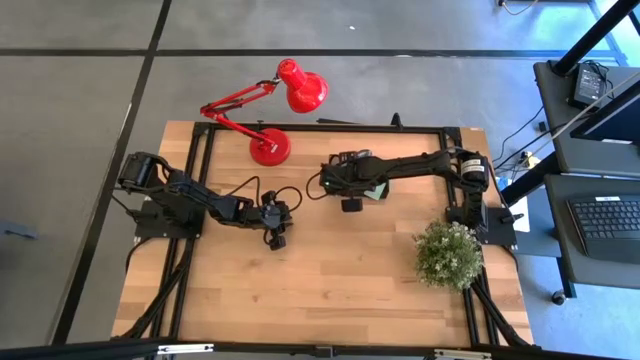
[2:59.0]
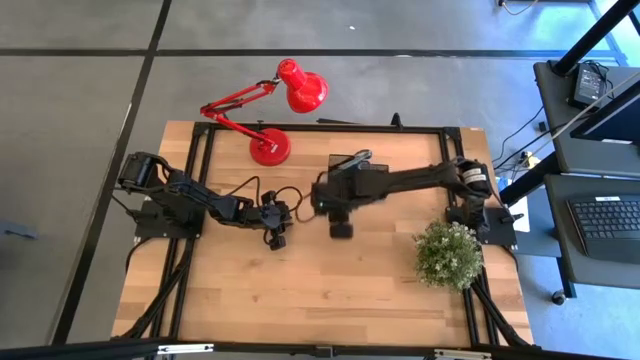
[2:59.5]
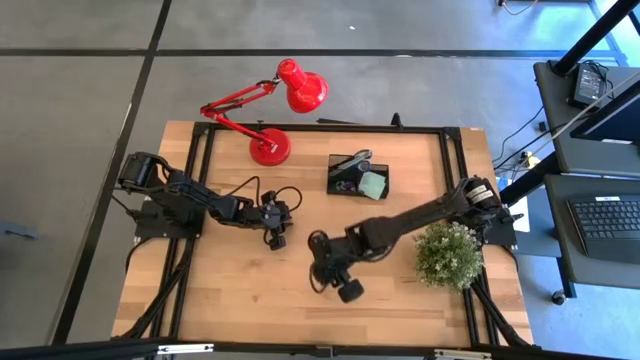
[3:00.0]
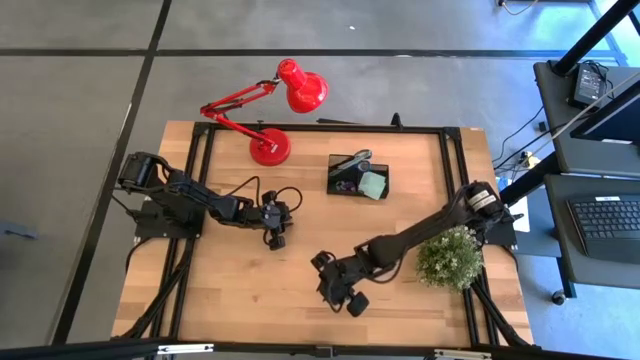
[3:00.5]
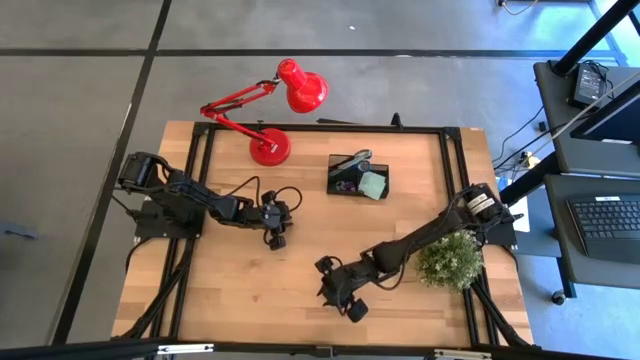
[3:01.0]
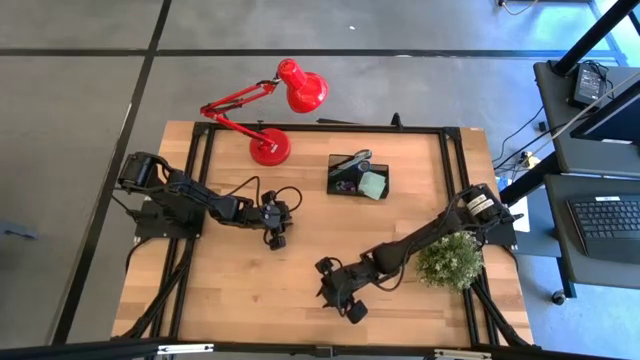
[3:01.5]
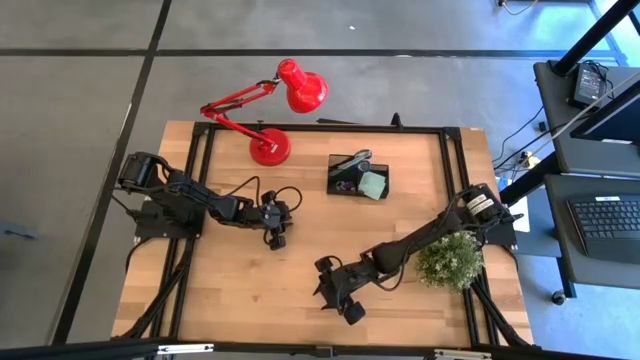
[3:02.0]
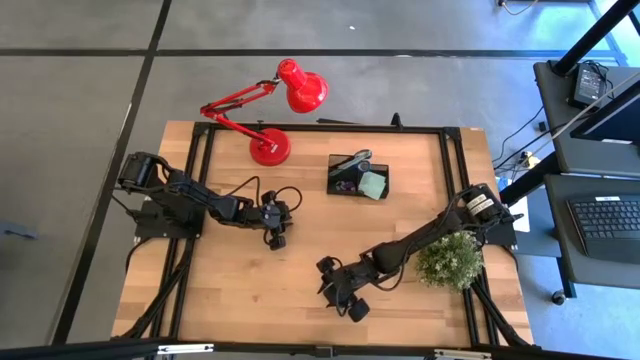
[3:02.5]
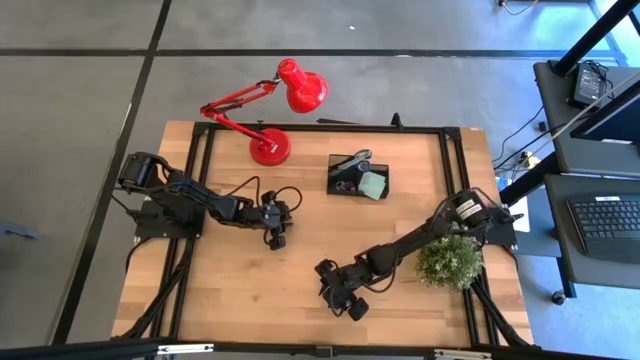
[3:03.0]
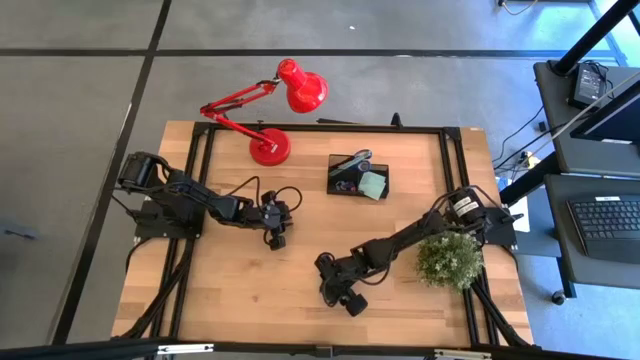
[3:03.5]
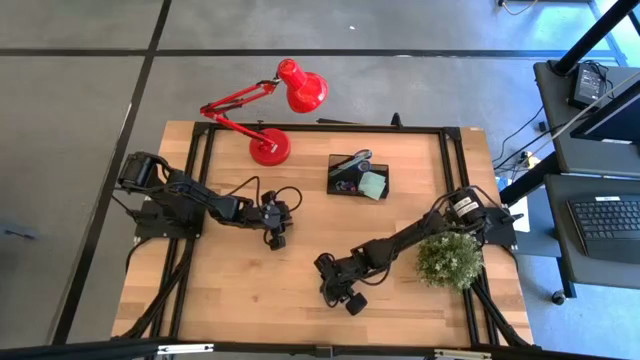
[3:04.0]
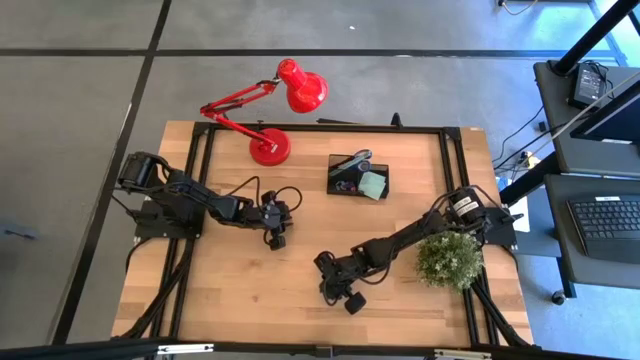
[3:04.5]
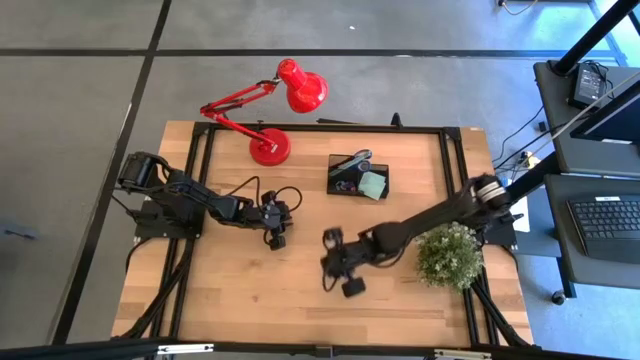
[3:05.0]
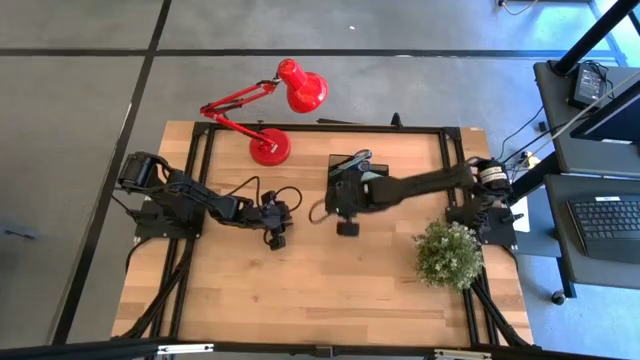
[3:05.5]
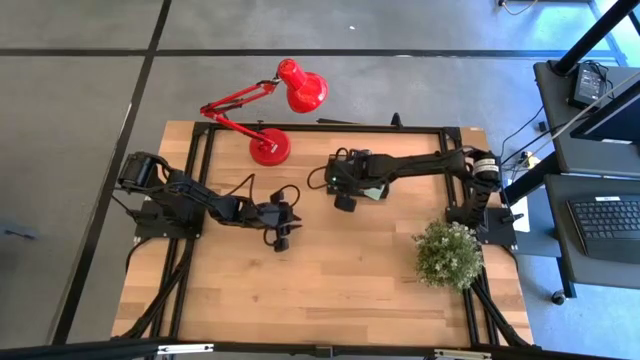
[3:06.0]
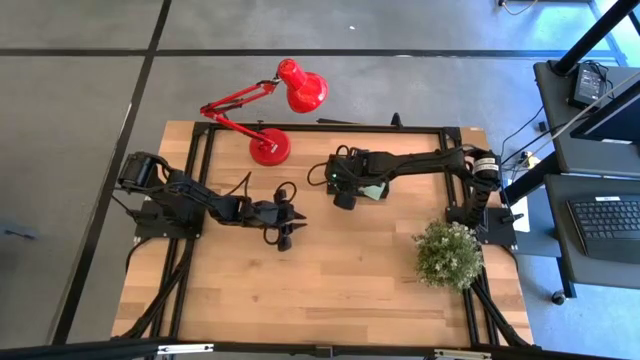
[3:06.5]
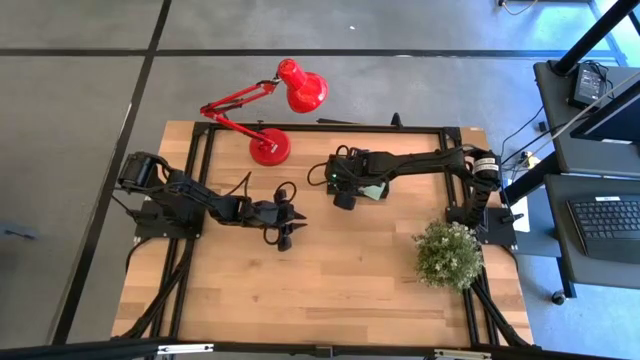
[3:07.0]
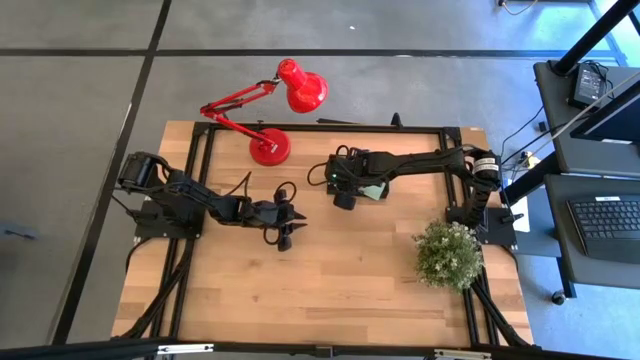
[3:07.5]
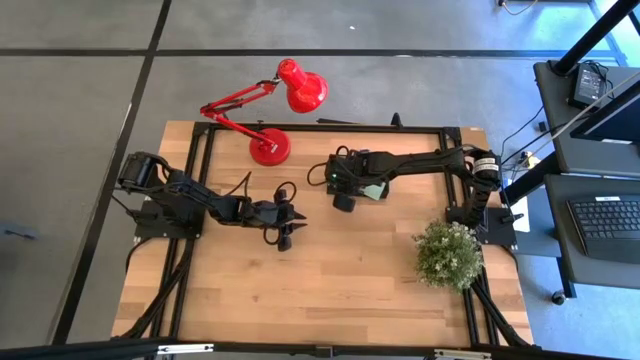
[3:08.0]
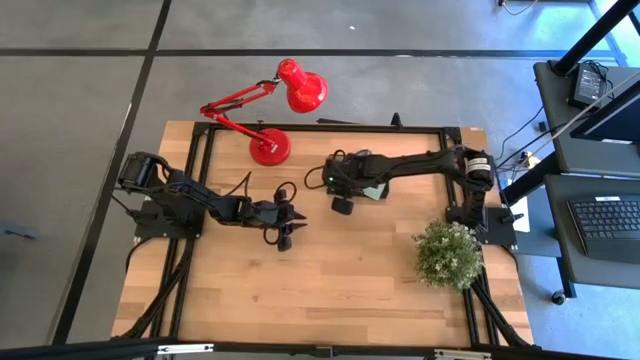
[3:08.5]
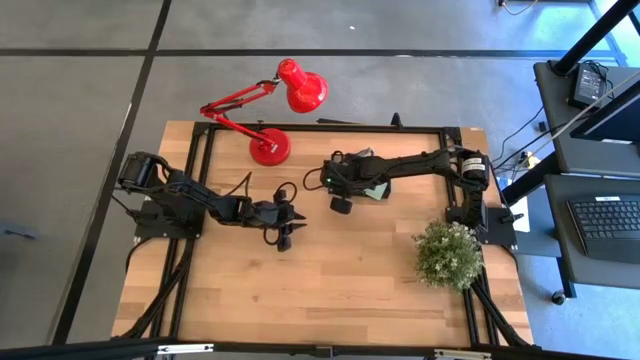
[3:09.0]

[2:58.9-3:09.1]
Task: Pick and place office supplies into organizer
Put the right pink binder clip into the black desk organizer

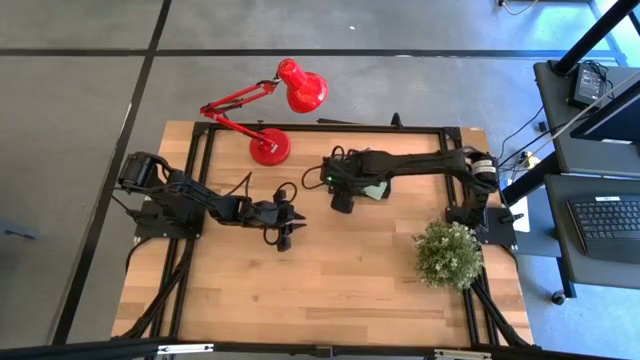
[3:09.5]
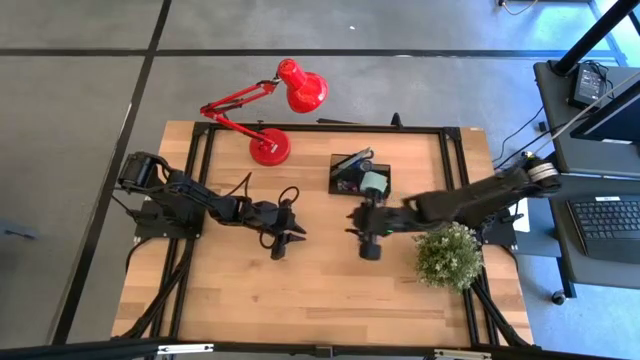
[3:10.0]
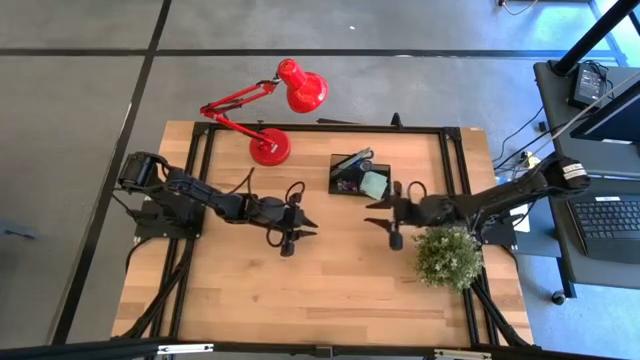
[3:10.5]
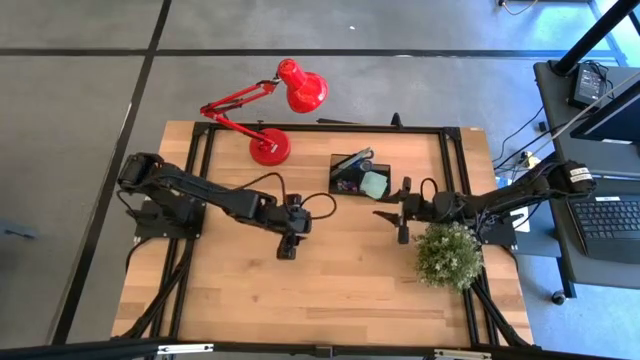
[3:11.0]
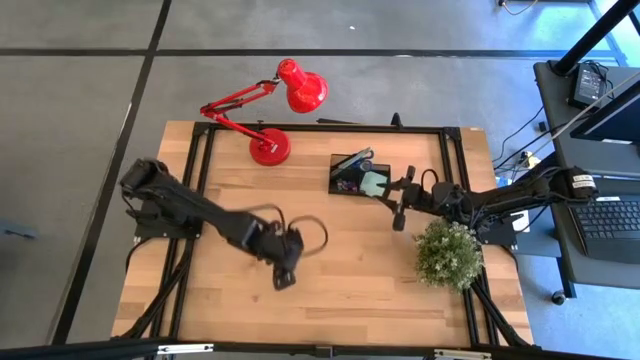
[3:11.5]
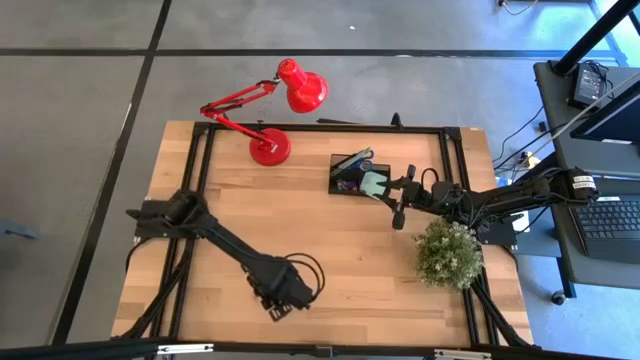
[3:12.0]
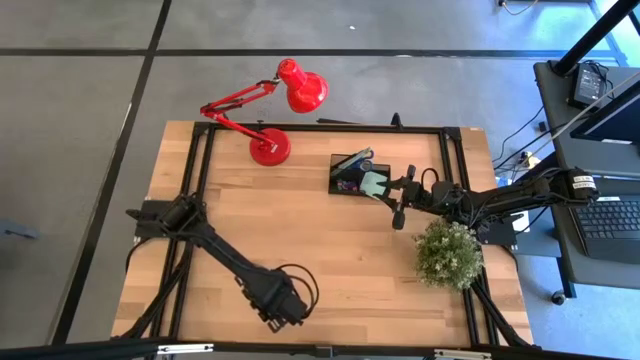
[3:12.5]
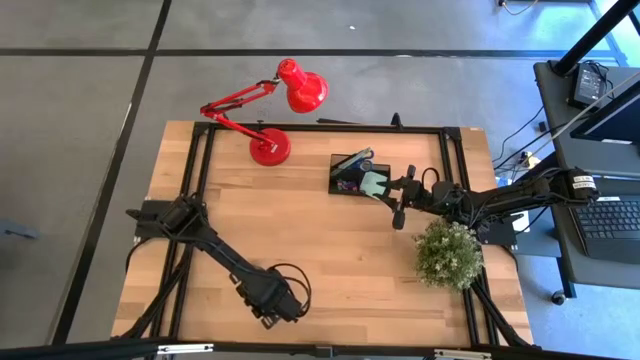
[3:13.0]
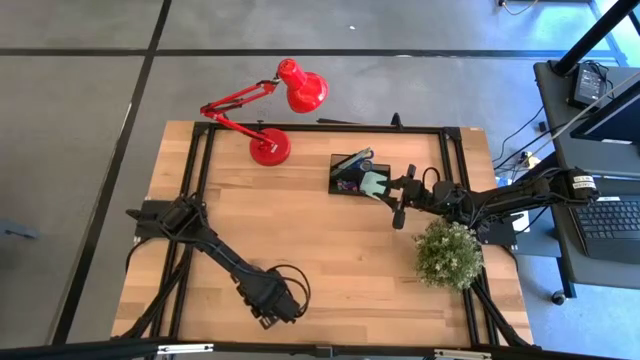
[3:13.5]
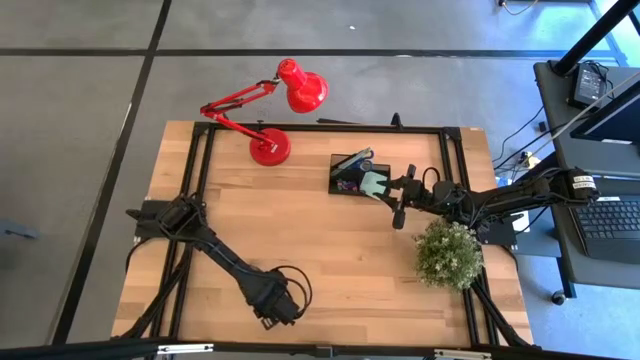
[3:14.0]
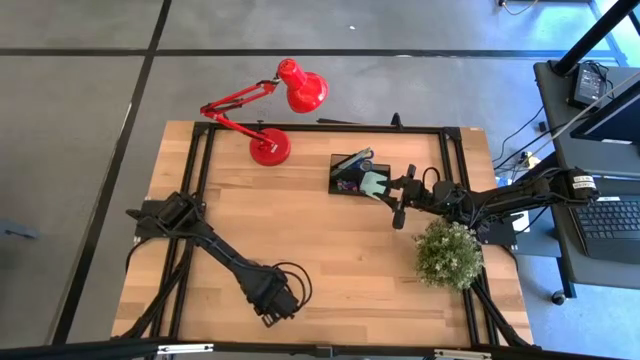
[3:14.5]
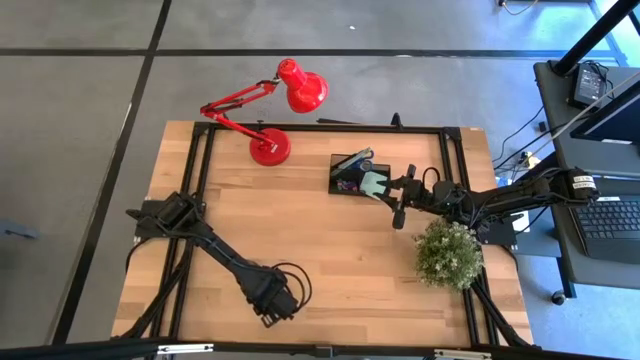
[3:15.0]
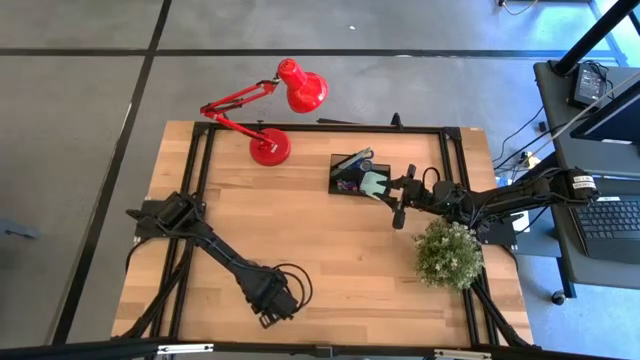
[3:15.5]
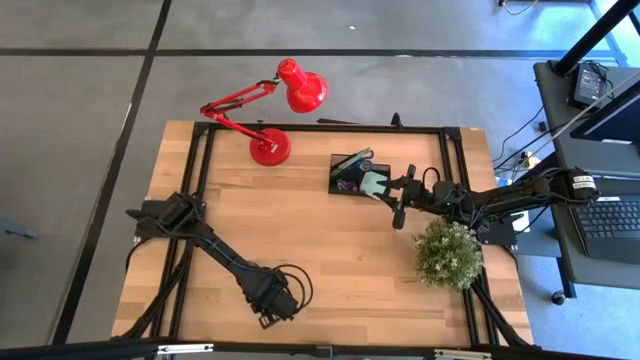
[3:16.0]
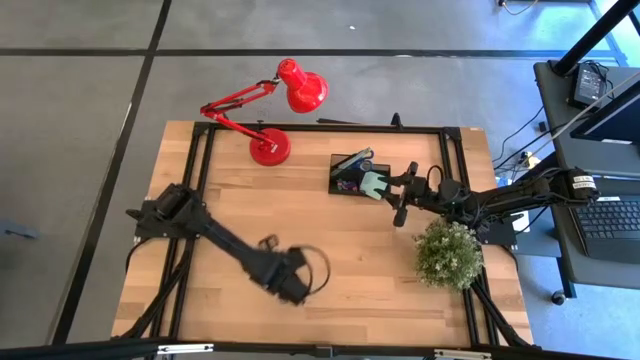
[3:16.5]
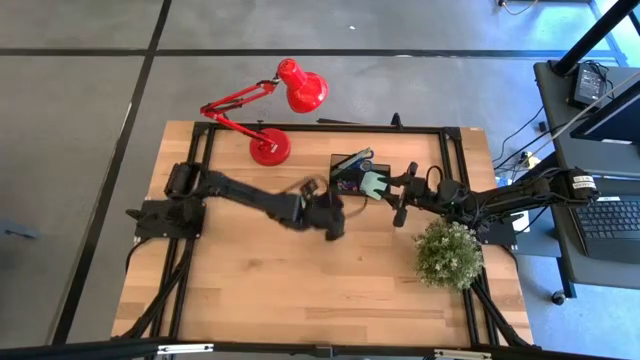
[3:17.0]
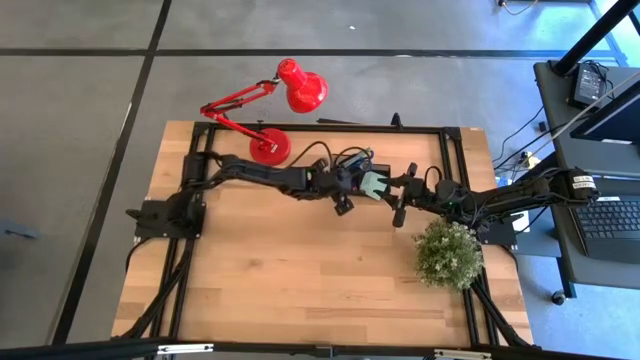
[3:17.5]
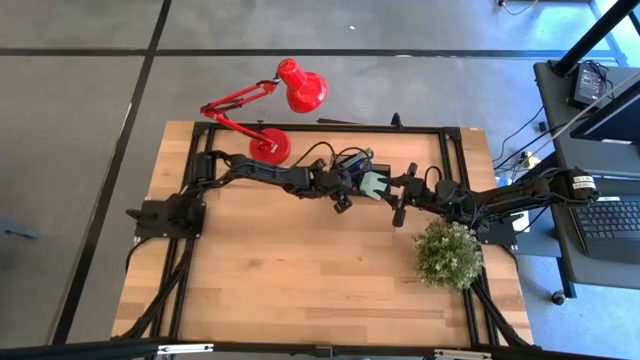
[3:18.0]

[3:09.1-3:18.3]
Put the pink binder clip into the black desk organizer

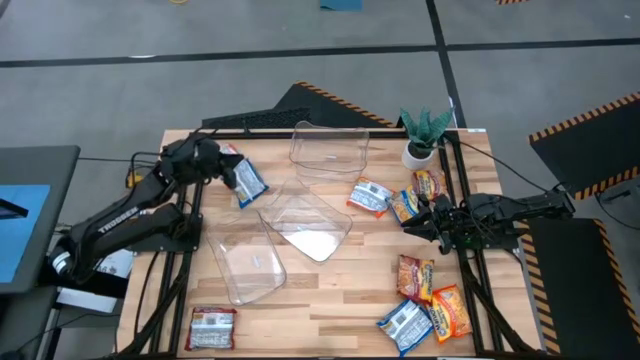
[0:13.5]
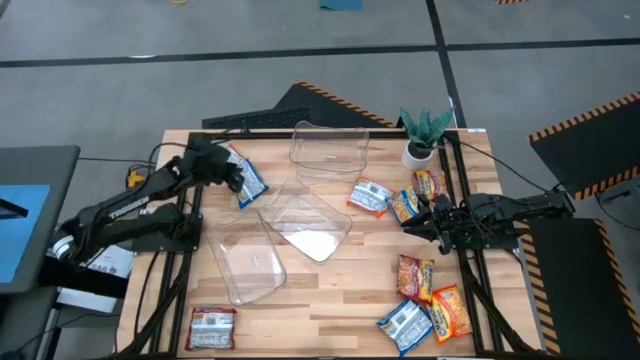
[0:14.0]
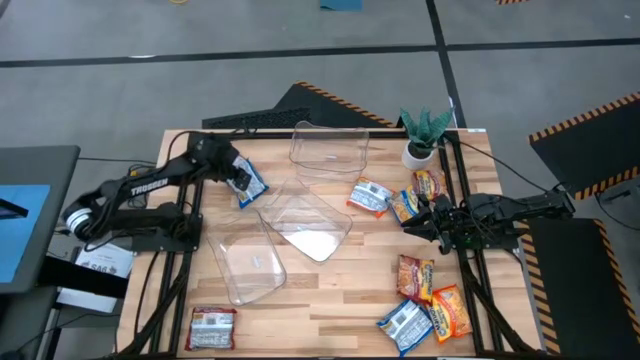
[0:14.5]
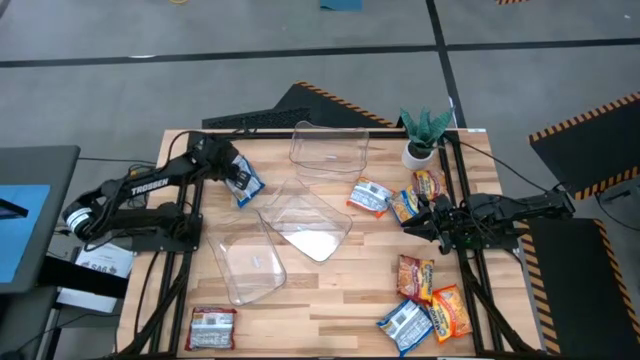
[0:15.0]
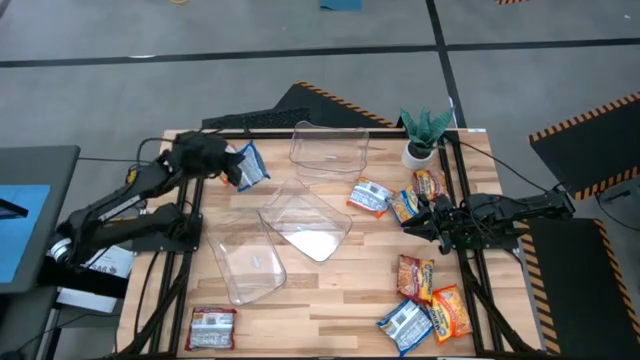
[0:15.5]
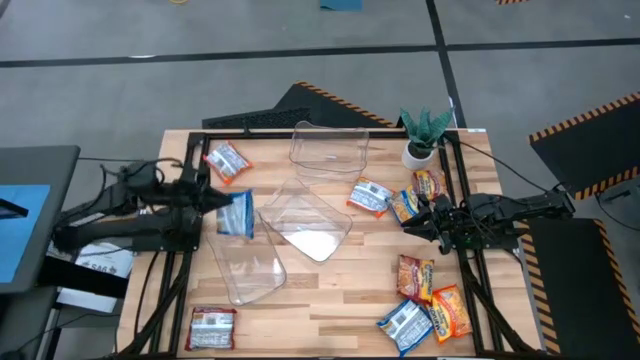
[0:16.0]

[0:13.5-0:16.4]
Task: Sort Maruchan noodles
Put the top left blue noodle pack into the bottom transparent bin
